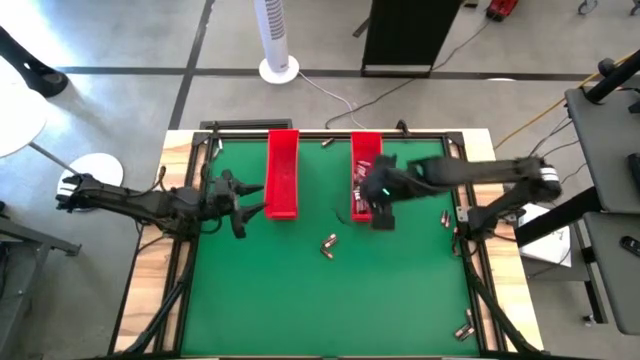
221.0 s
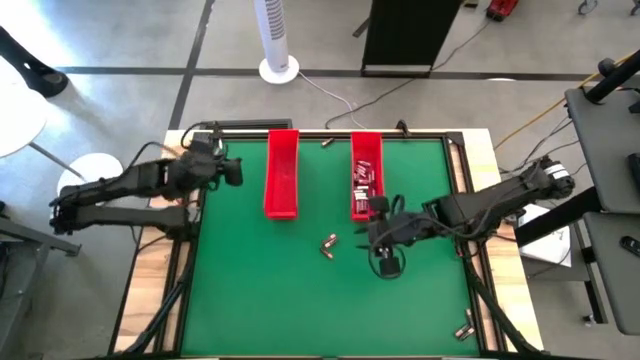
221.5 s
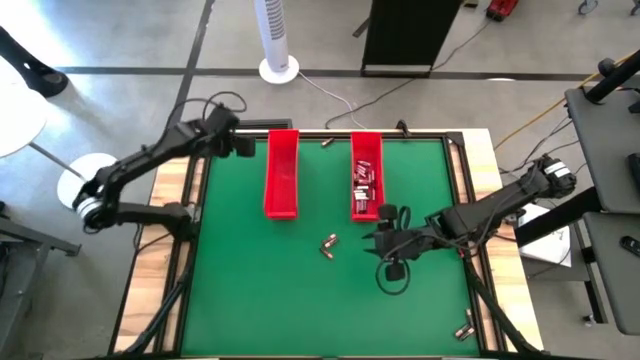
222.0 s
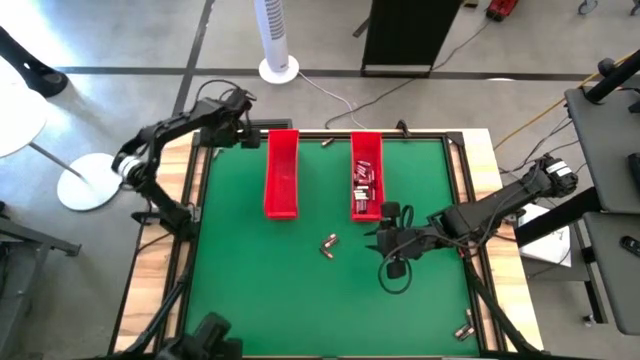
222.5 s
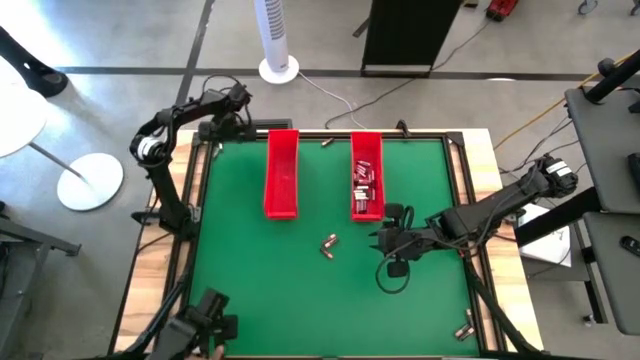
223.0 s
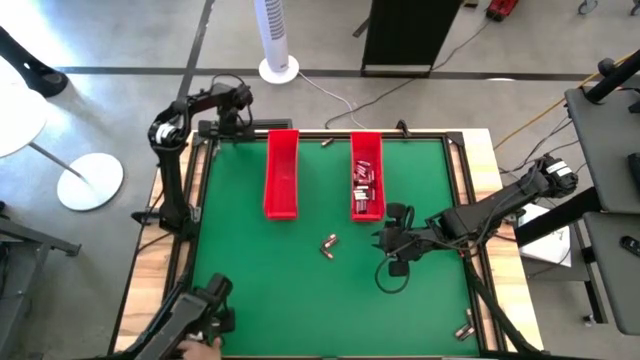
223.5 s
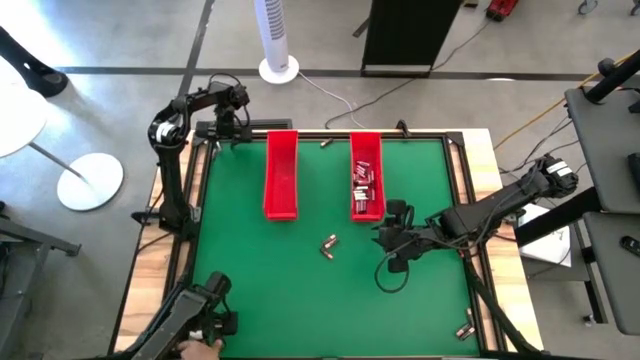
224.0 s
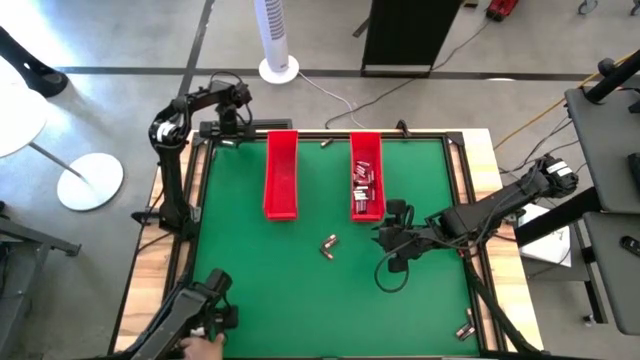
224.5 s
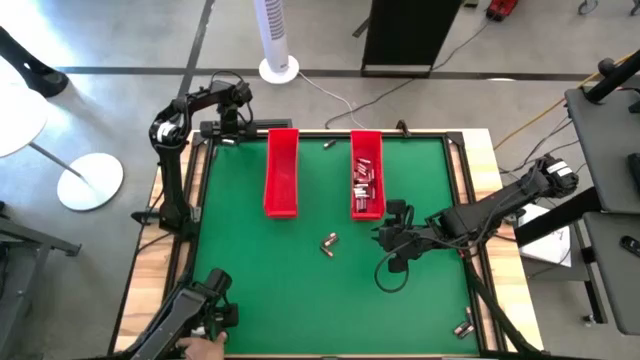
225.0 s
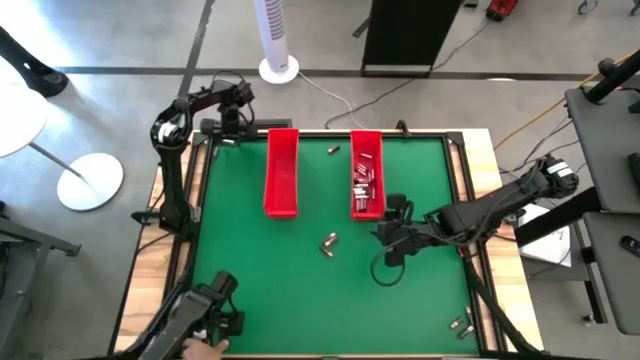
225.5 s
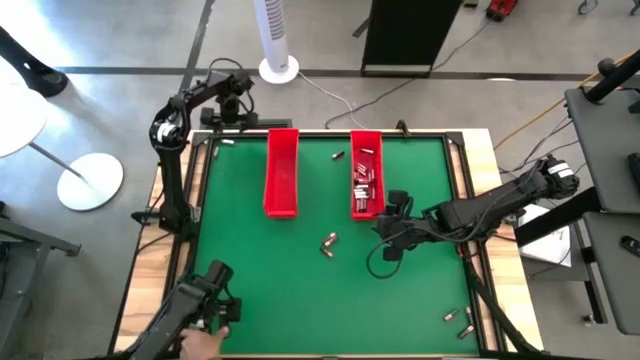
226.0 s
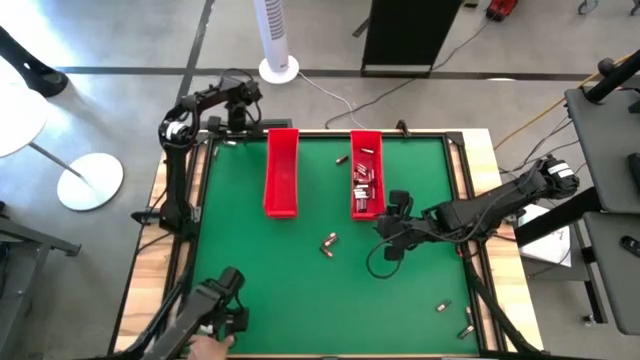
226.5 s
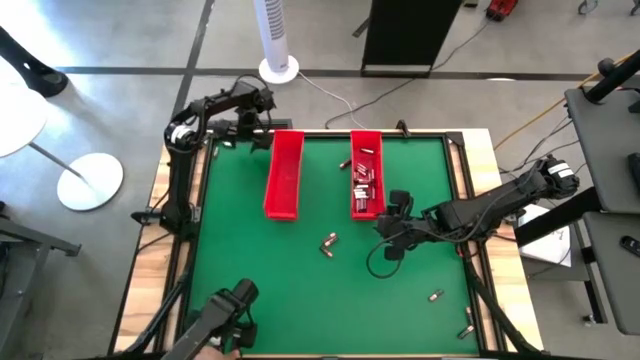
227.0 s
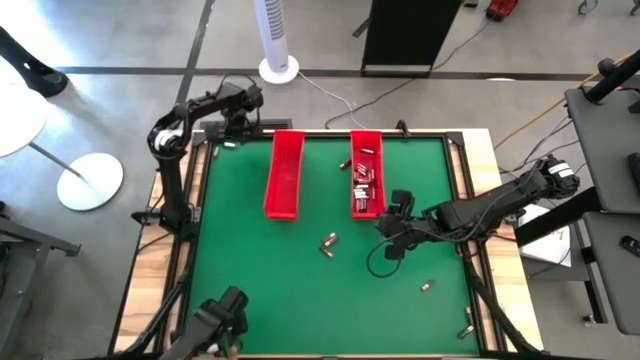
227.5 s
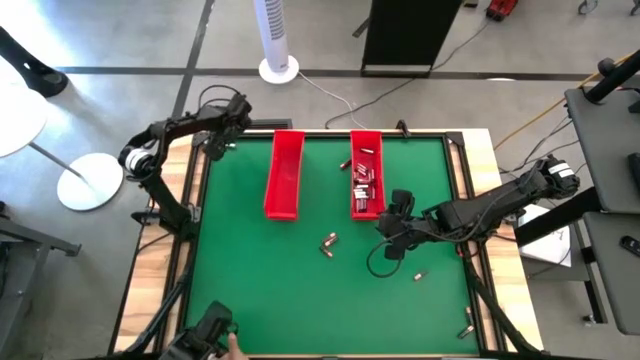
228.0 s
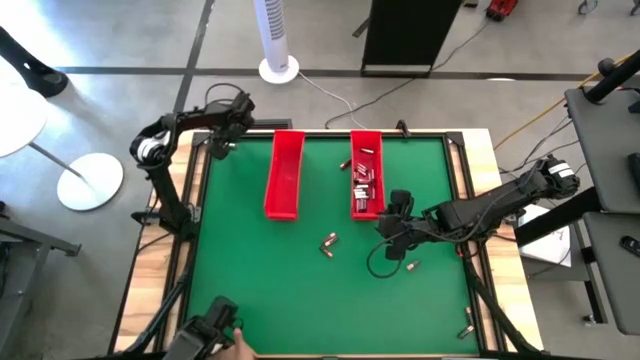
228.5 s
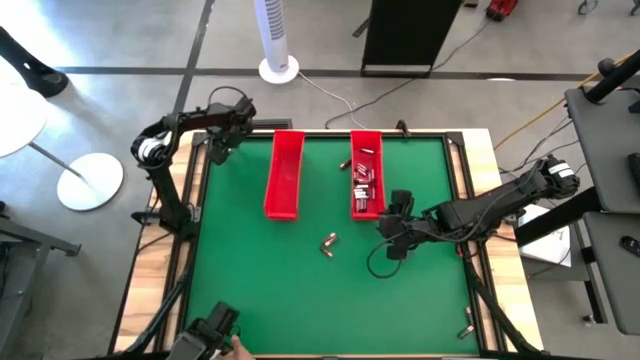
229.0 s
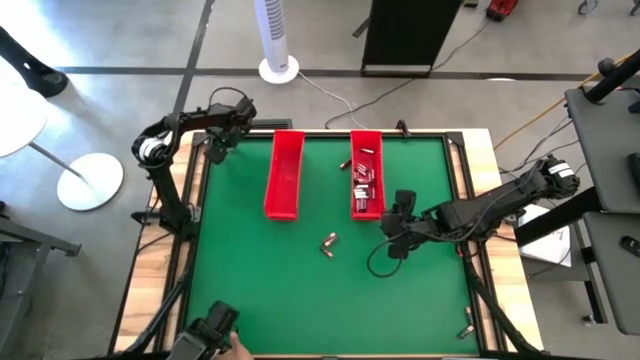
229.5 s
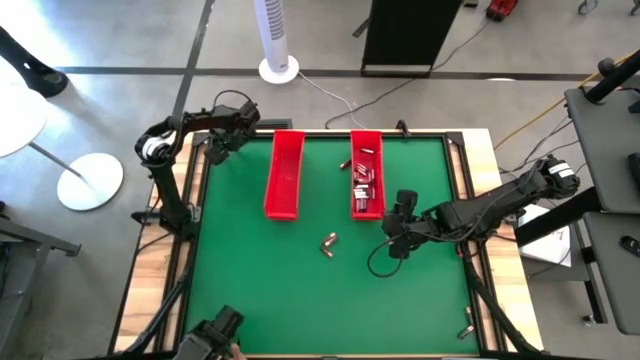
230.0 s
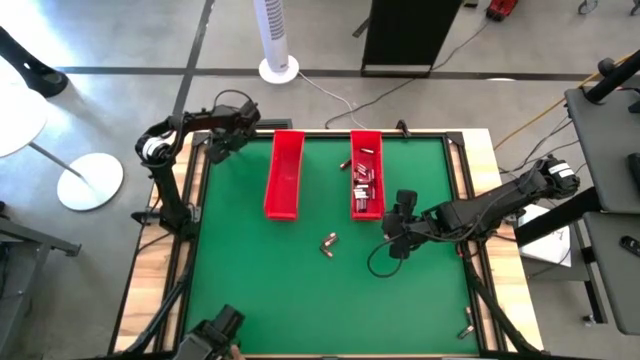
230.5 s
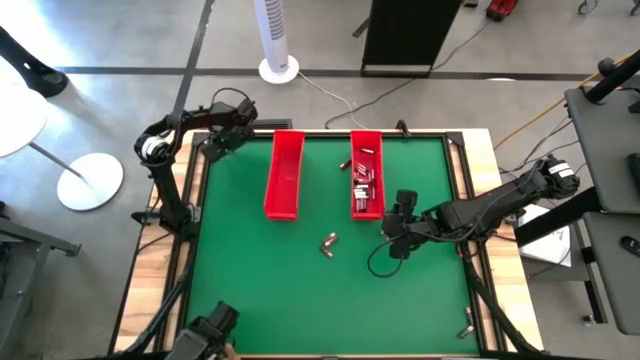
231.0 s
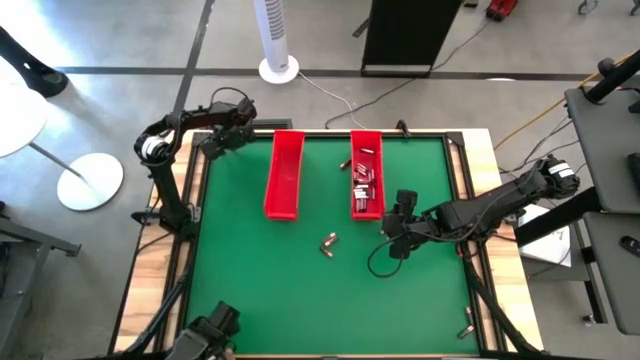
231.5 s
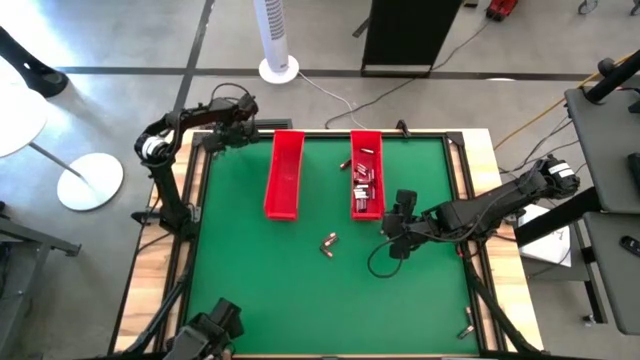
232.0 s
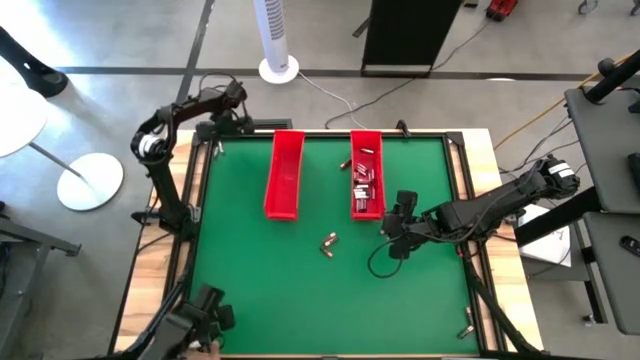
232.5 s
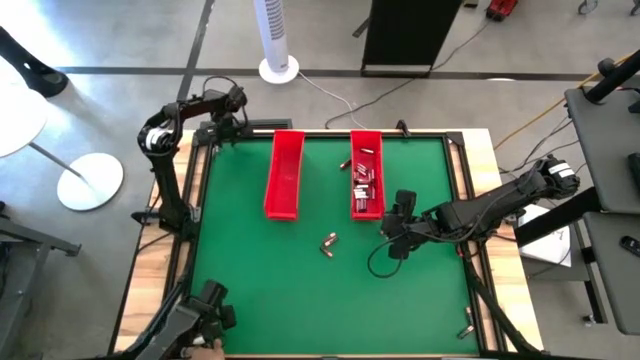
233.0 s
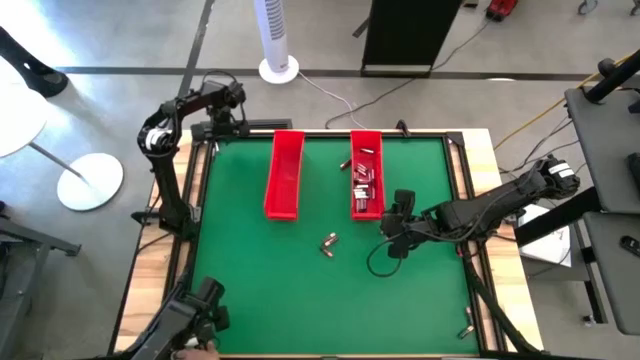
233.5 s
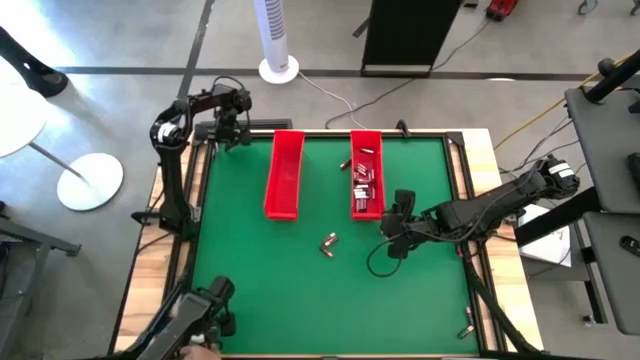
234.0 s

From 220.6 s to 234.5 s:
Task: Sort batteries
Put the silver battery into the right red bin

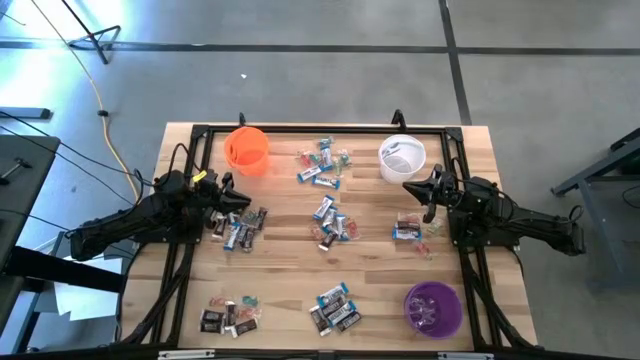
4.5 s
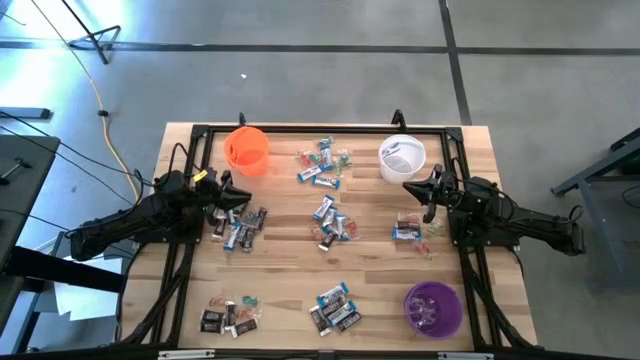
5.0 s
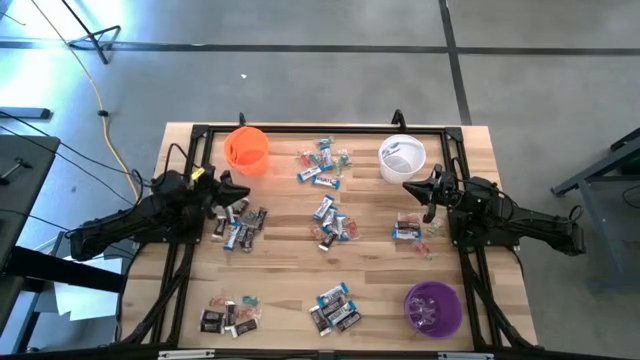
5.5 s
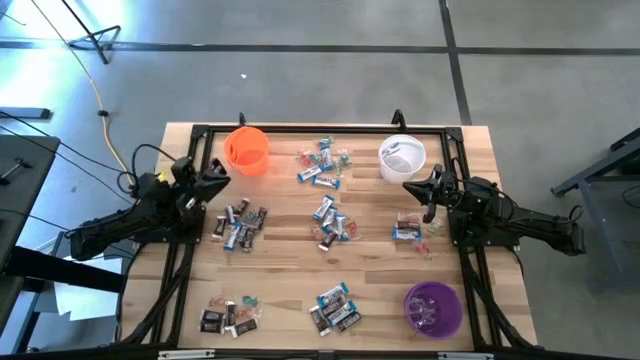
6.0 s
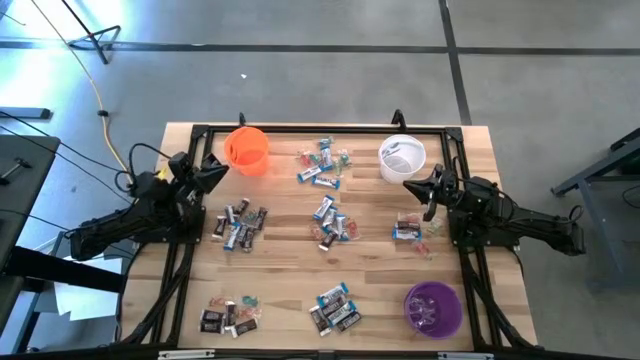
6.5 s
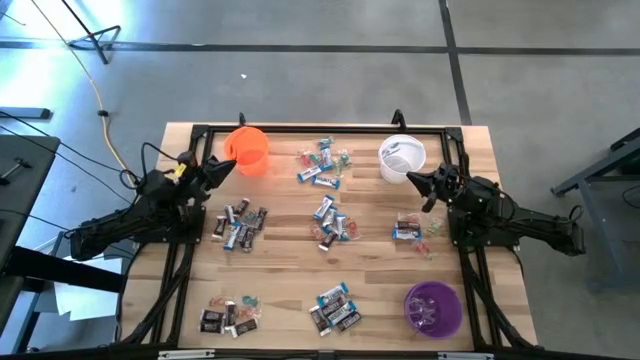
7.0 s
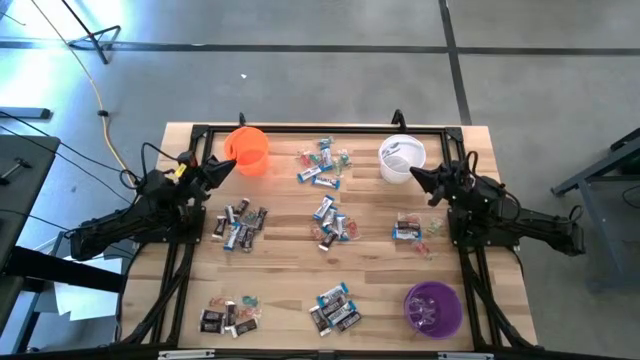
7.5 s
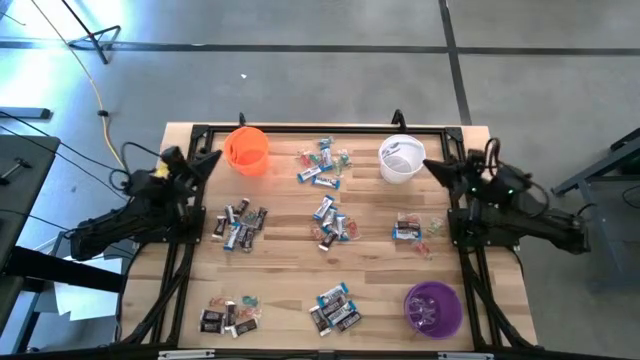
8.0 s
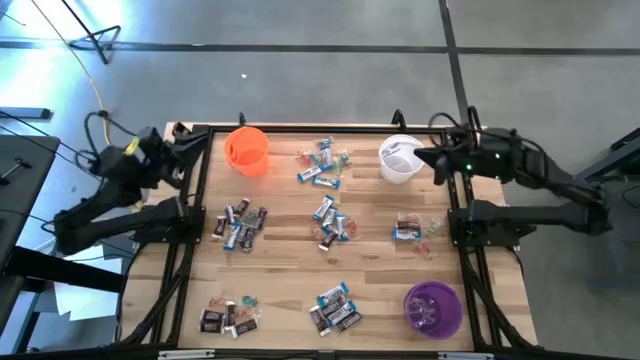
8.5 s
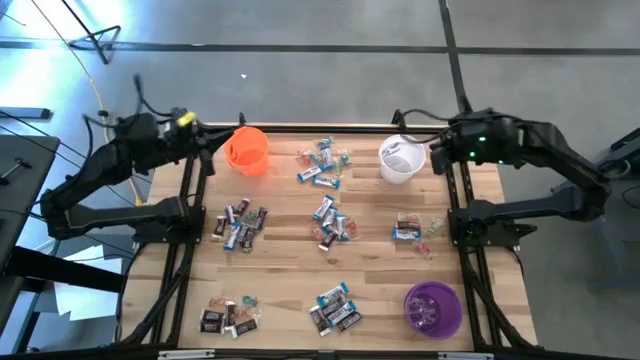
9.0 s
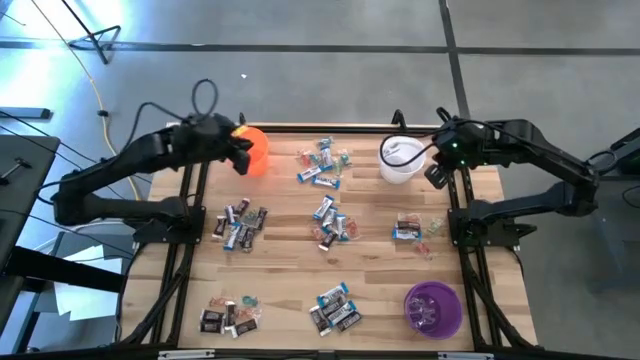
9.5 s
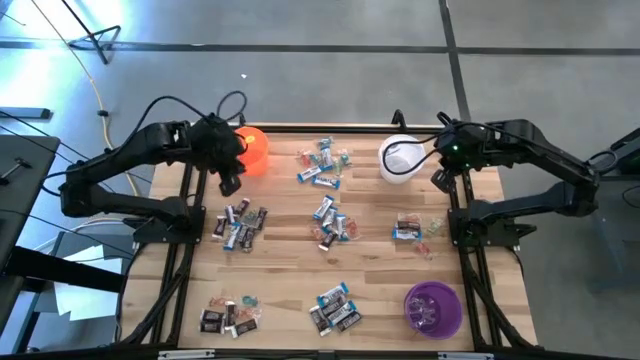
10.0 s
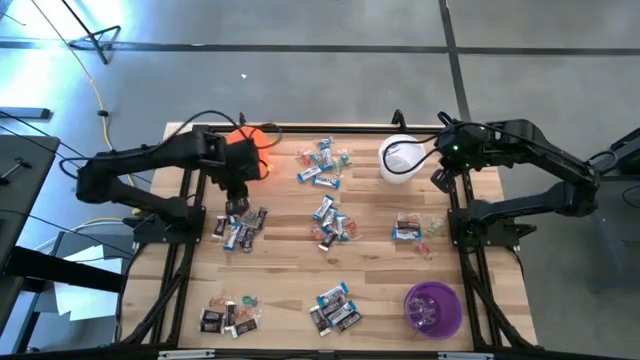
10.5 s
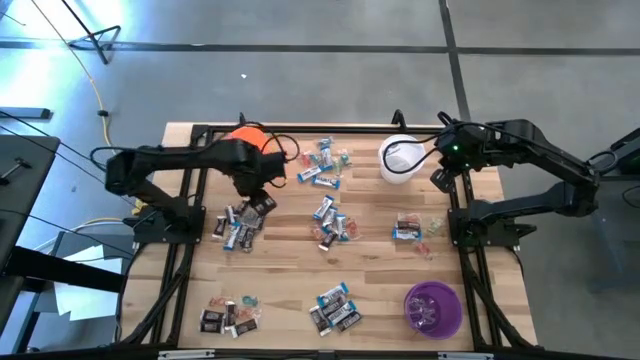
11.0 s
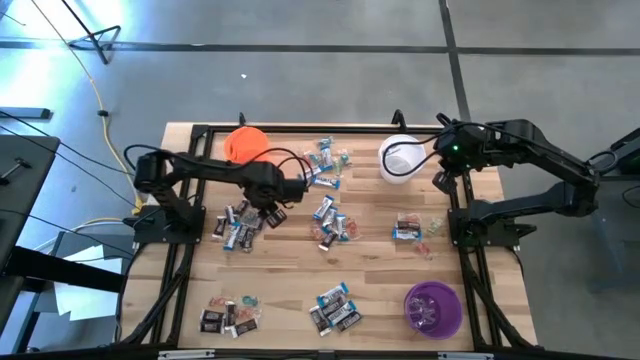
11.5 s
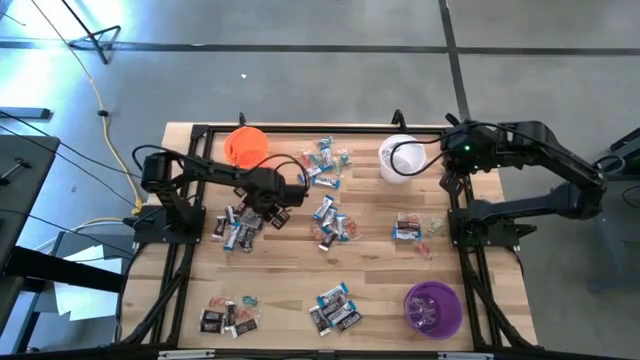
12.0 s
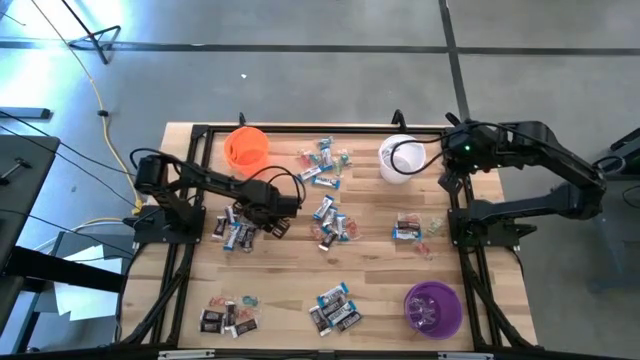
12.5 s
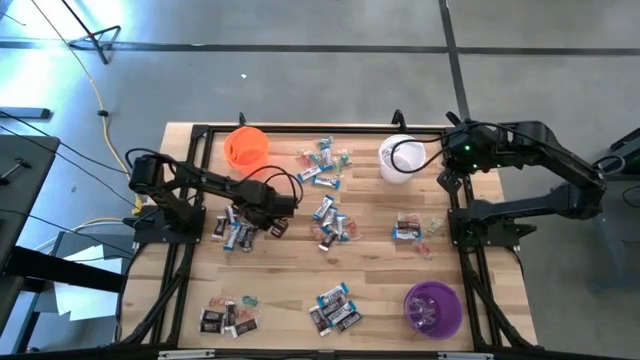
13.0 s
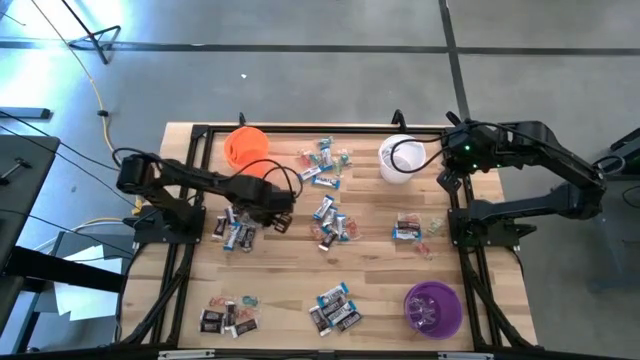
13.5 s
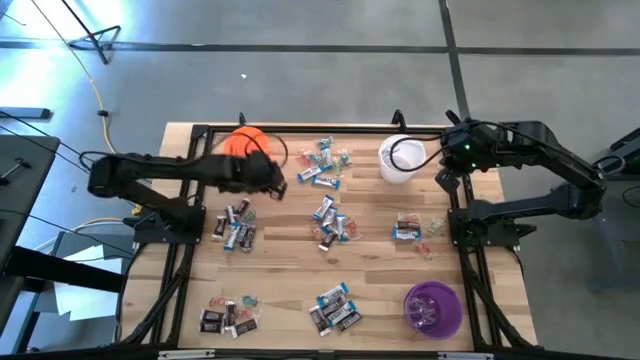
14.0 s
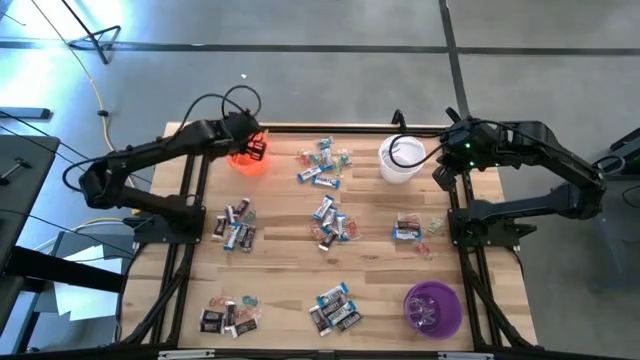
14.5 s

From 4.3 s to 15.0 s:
Task: Sort candy
Put the brown chocolate into the orange bucket
